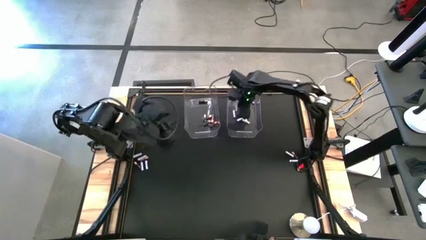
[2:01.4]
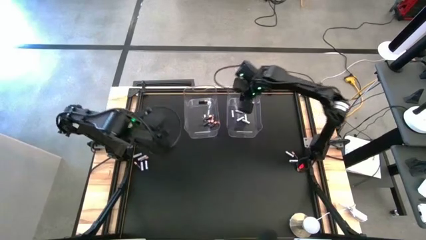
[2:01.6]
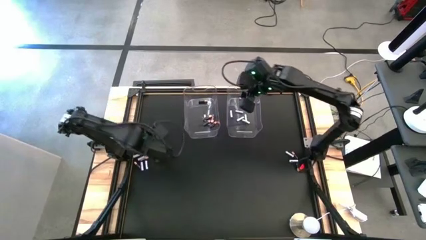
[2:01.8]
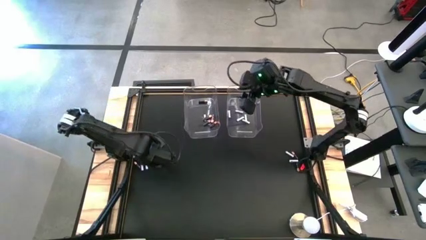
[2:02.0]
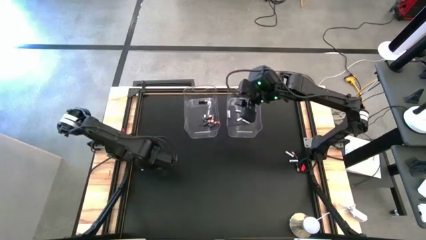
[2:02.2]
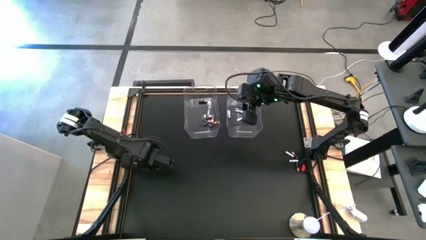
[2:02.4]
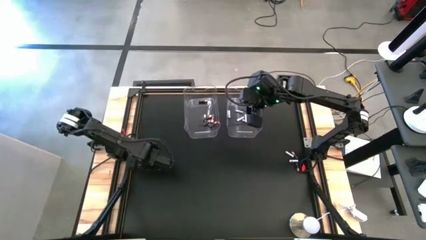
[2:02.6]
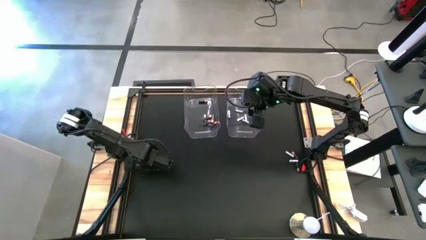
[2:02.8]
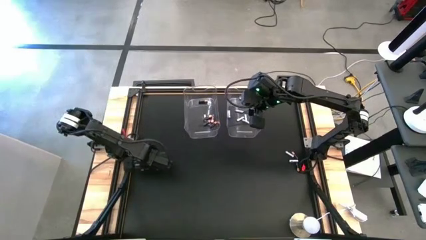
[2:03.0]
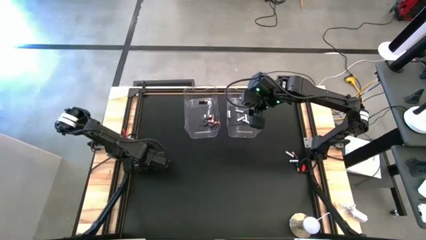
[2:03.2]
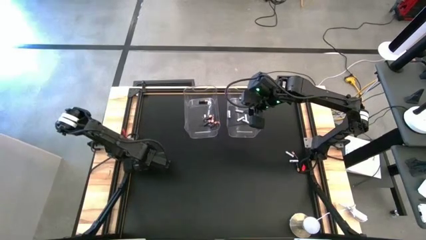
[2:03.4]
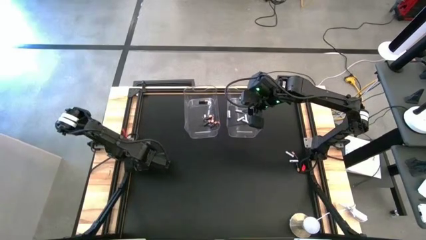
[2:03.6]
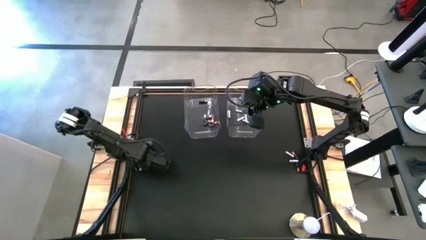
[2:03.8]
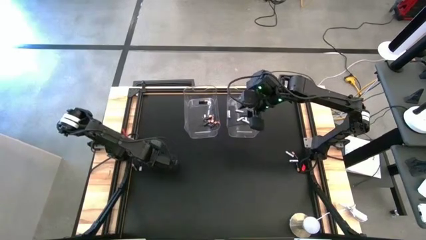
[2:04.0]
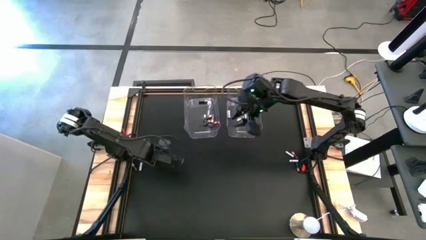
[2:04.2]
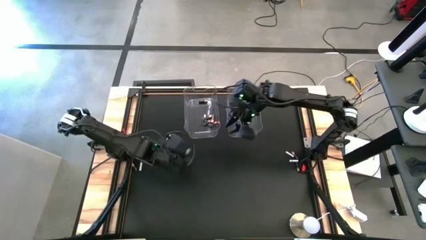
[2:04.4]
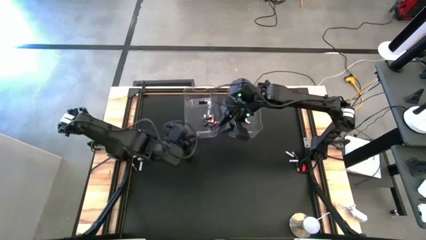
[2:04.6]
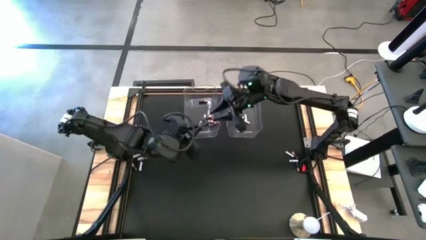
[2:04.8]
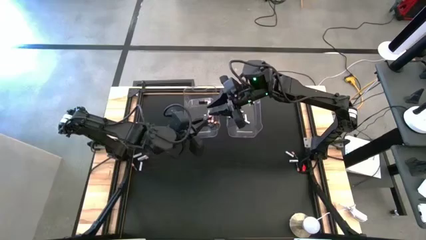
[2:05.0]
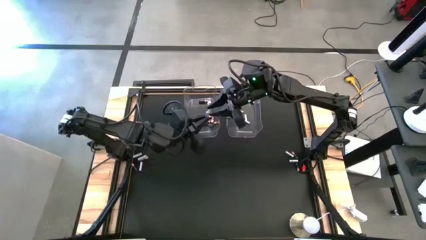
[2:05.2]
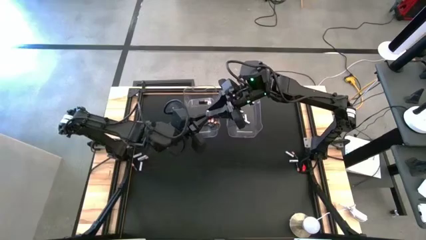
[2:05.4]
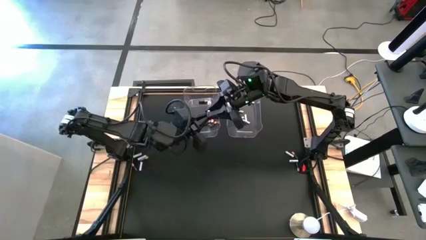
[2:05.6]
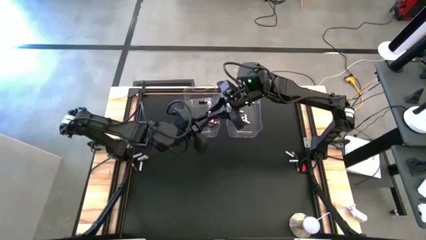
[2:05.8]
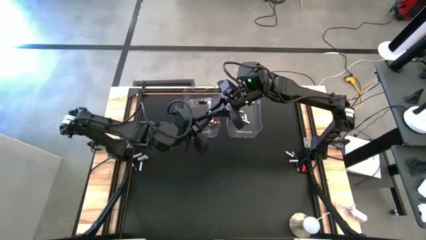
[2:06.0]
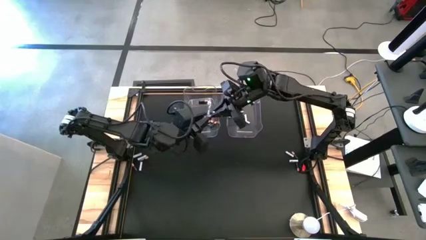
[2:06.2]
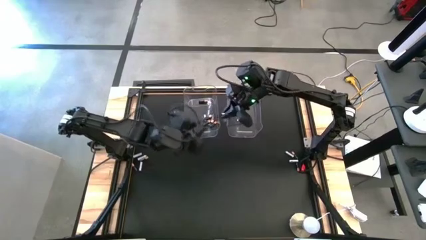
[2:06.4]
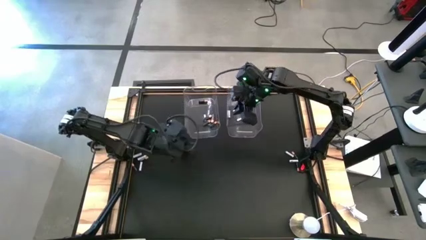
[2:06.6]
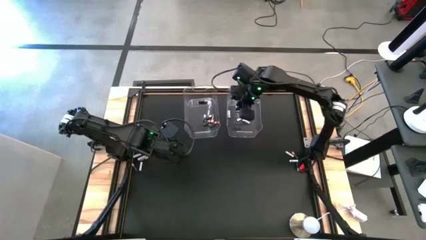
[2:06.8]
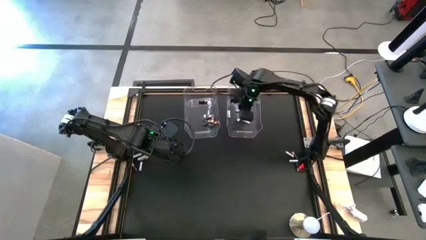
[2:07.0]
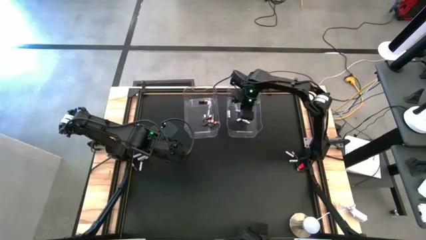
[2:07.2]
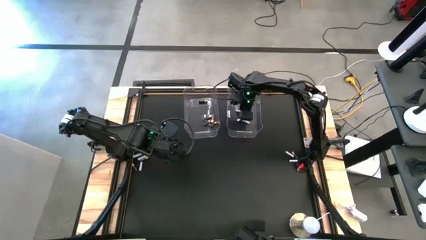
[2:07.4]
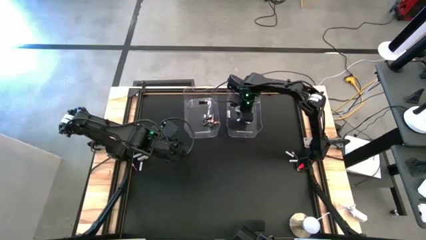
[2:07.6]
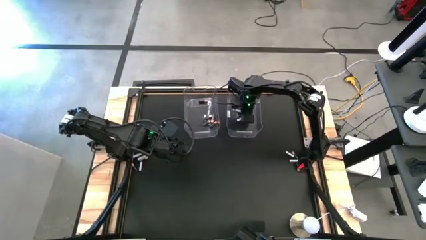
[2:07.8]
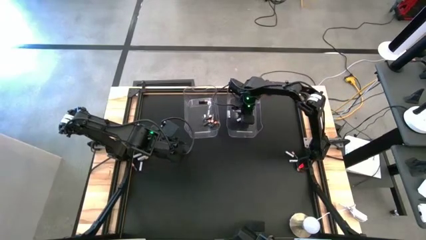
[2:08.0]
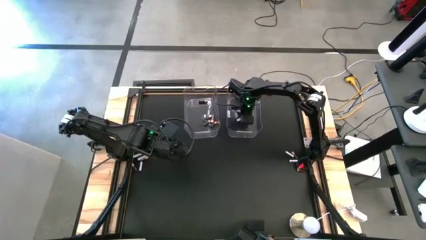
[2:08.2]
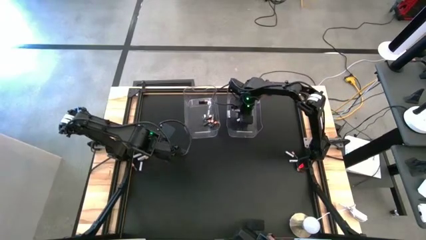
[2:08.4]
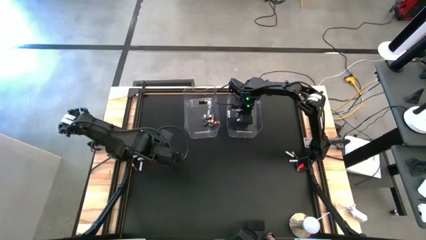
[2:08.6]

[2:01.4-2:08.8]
Task: Sort batteries
Put the white battery into the right storage bin

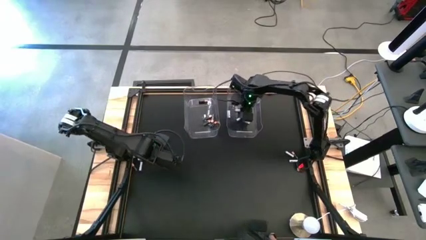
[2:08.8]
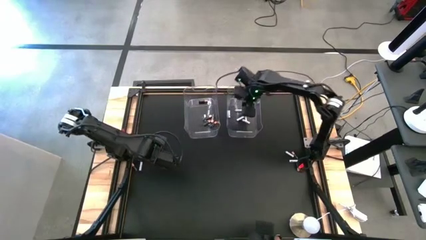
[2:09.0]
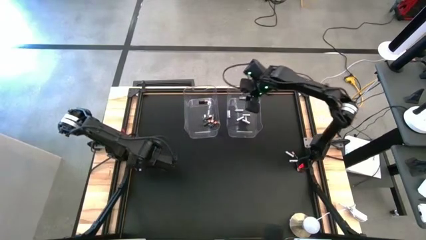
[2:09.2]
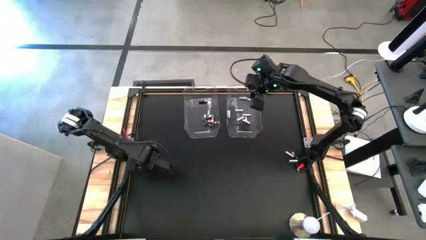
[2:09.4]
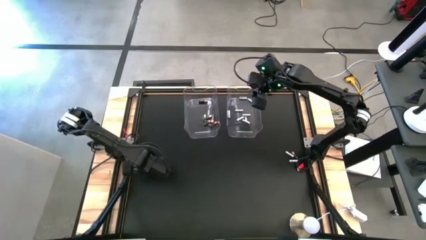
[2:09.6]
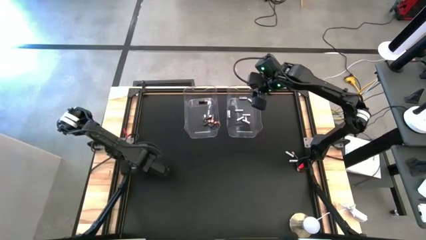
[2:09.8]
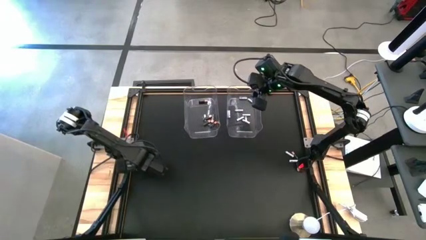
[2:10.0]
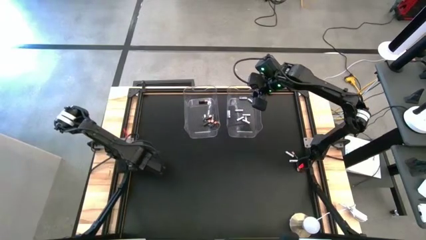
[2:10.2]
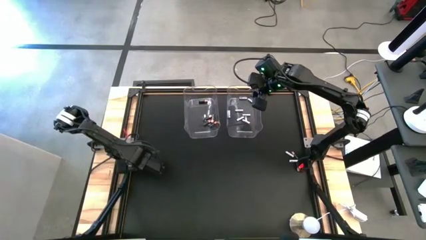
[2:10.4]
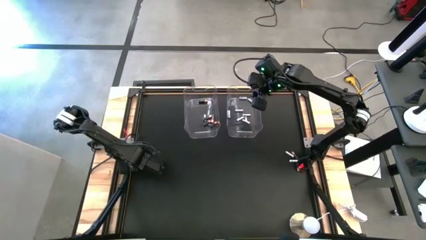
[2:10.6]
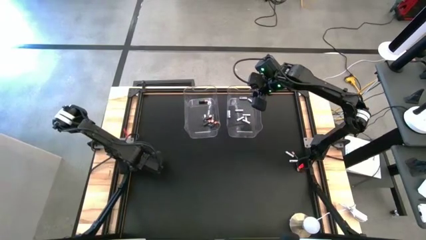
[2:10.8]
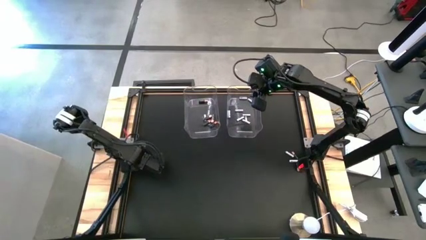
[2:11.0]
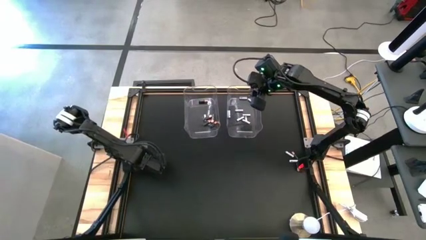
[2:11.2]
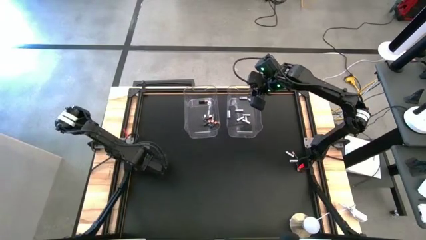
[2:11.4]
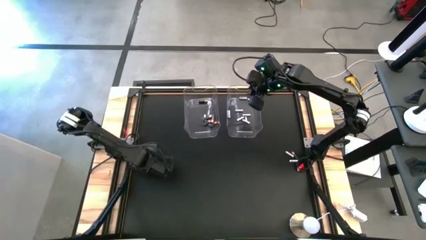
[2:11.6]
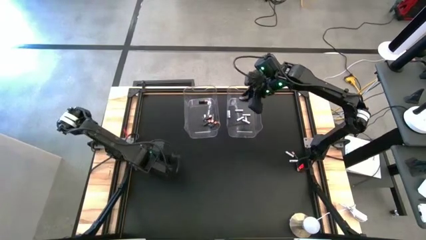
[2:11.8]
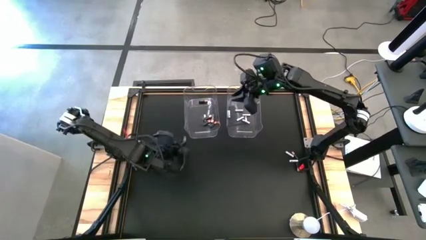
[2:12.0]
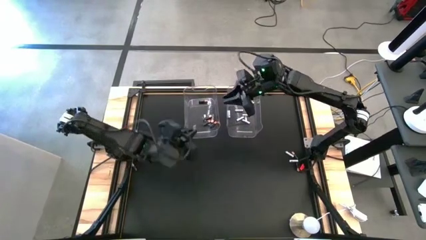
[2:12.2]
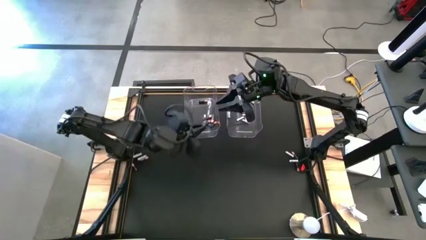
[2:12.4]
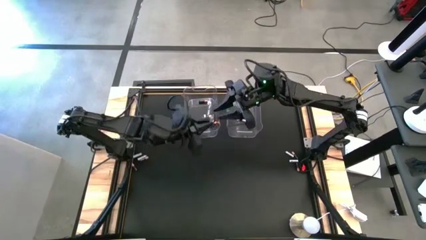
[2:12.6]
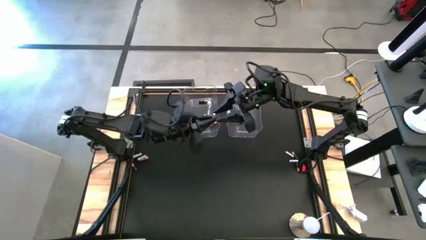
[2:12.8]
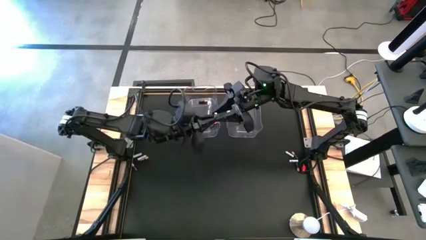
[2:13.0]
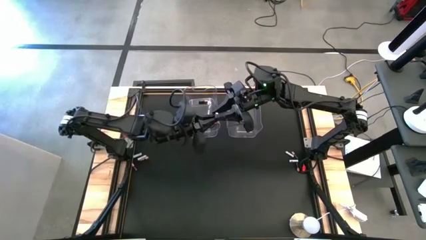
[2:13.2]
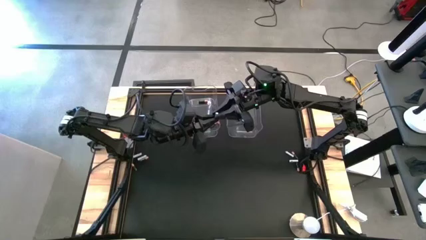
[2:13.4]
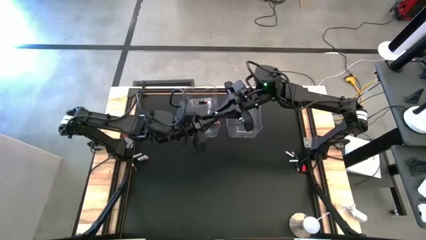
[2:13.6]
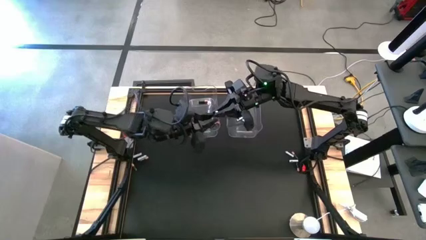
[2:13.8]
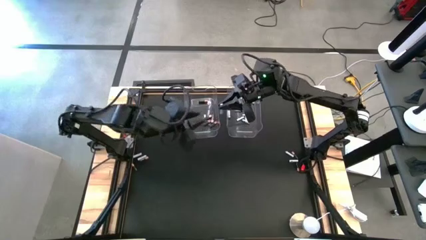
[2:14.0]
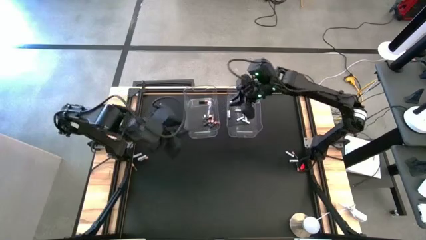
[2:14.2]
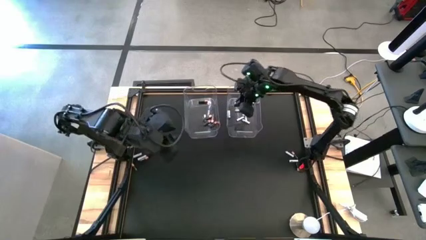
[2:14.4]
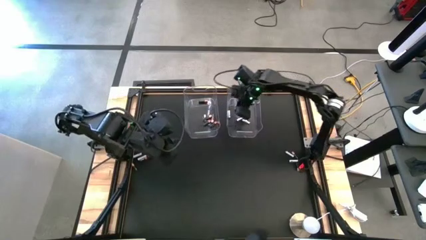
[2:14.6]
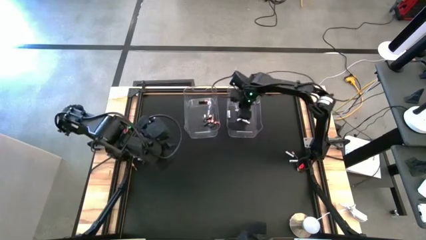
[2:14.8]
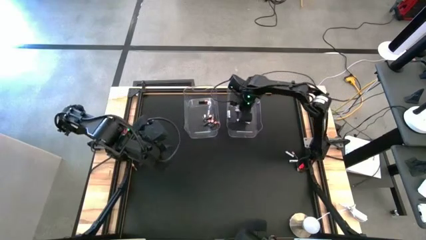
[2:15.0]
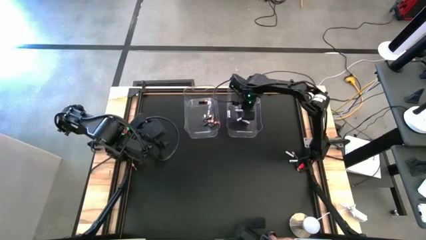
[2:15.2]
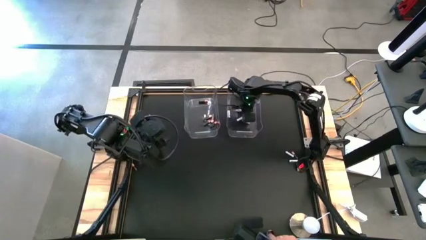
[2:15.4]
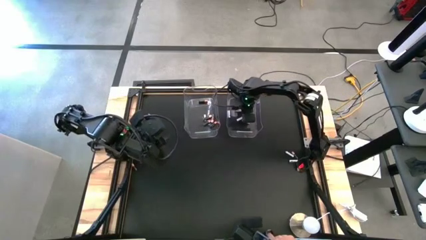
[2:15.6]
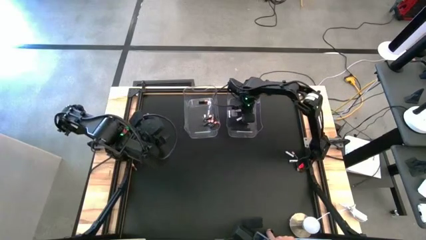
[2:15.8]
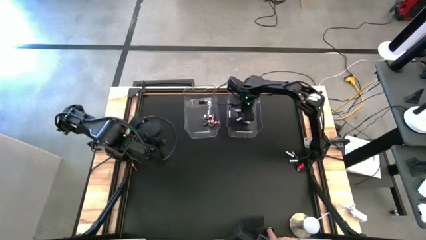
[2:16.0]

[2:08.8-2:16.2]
Put the white battery into the right transparent bin
